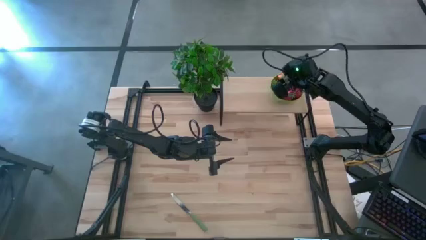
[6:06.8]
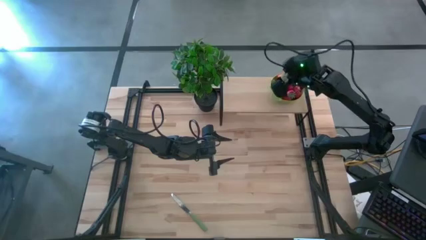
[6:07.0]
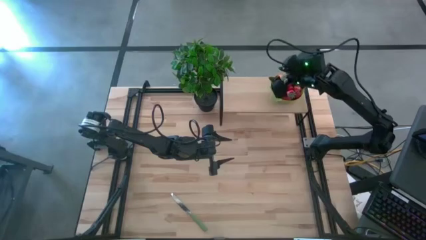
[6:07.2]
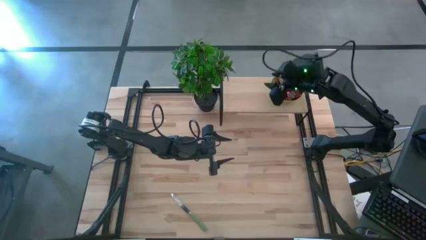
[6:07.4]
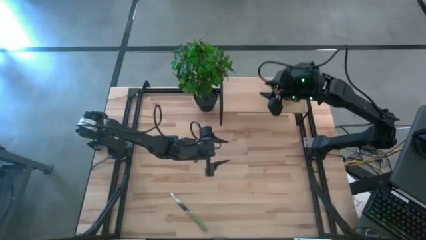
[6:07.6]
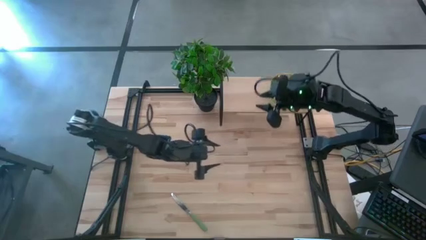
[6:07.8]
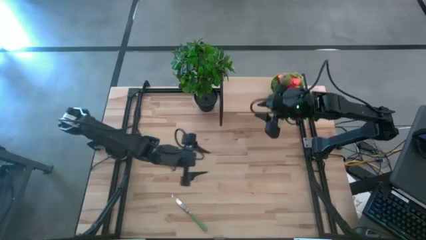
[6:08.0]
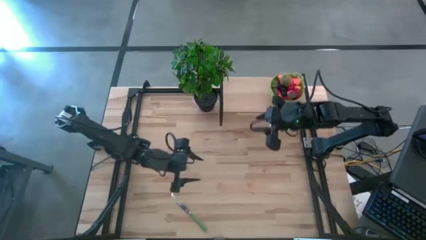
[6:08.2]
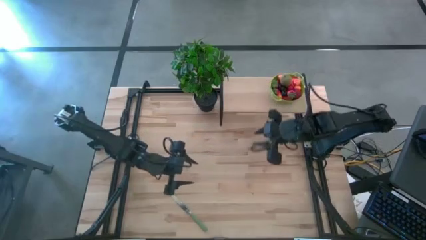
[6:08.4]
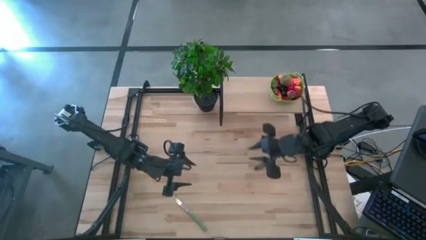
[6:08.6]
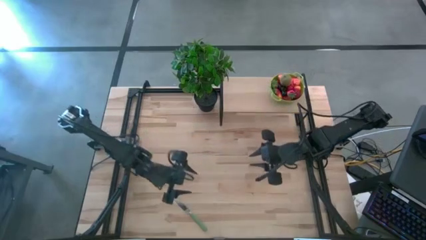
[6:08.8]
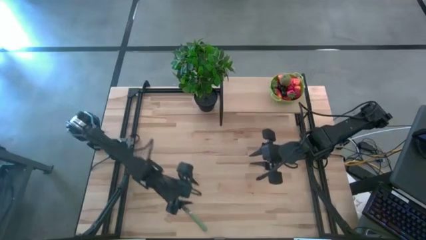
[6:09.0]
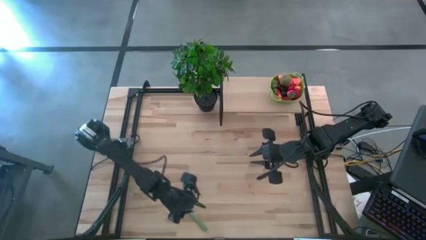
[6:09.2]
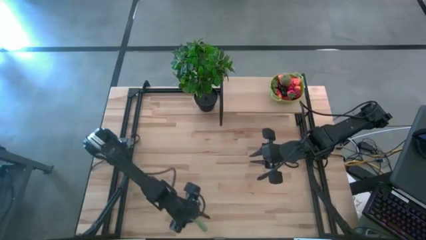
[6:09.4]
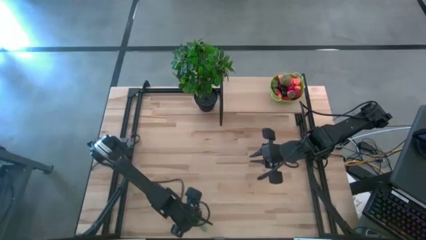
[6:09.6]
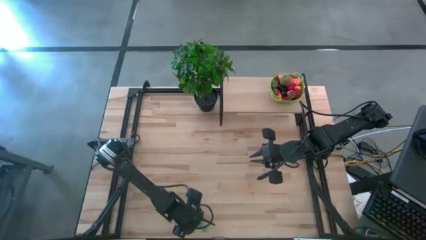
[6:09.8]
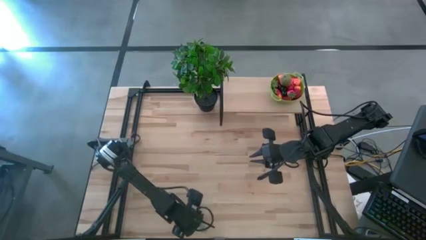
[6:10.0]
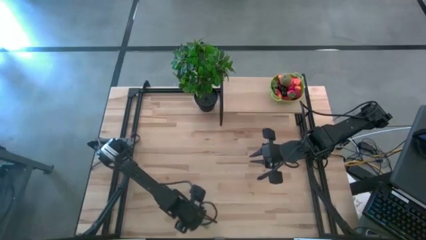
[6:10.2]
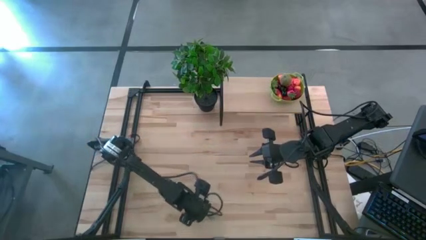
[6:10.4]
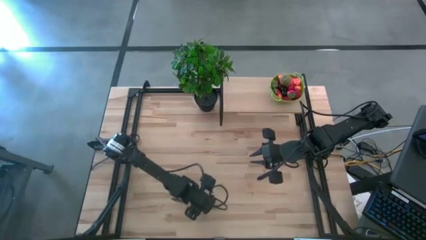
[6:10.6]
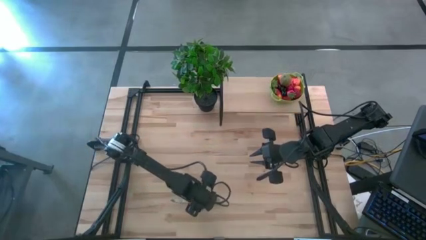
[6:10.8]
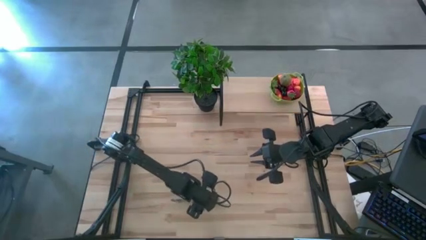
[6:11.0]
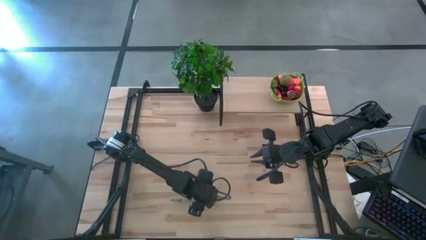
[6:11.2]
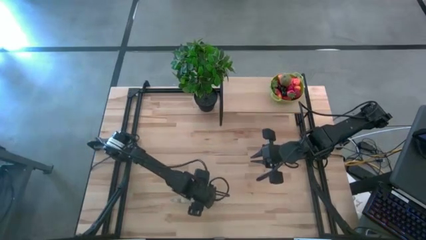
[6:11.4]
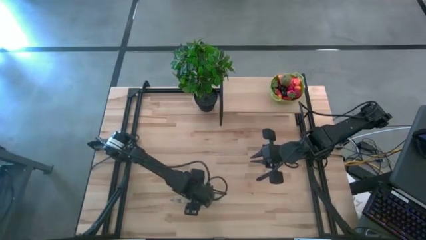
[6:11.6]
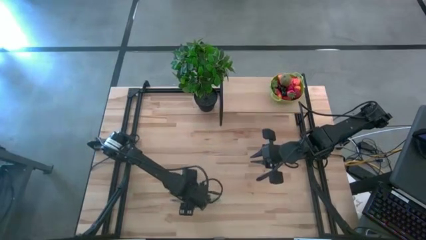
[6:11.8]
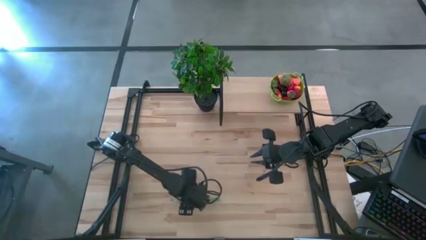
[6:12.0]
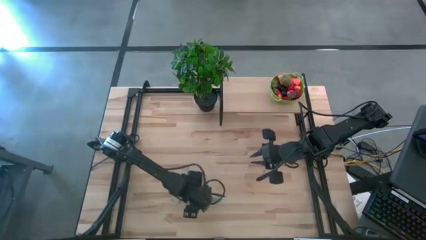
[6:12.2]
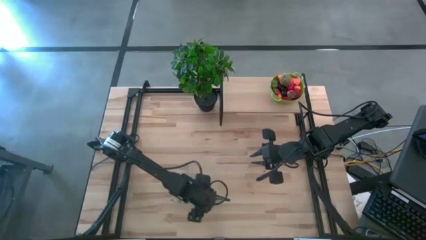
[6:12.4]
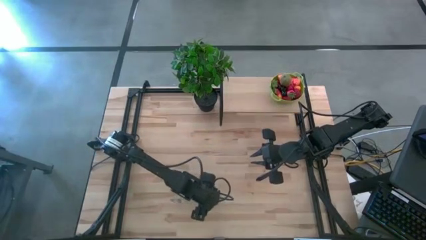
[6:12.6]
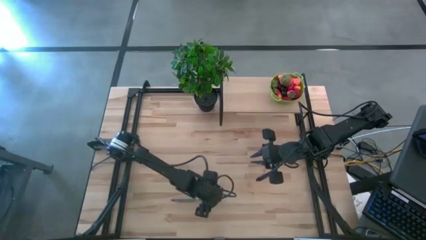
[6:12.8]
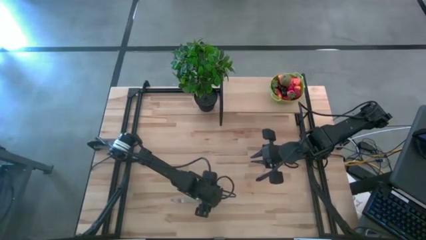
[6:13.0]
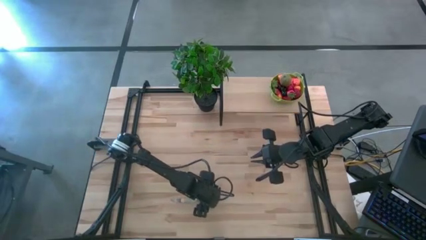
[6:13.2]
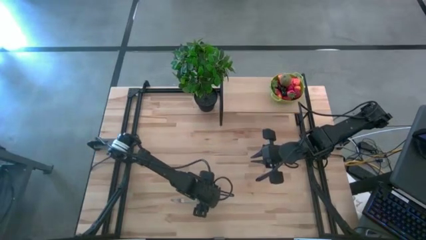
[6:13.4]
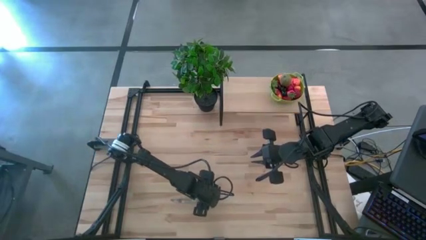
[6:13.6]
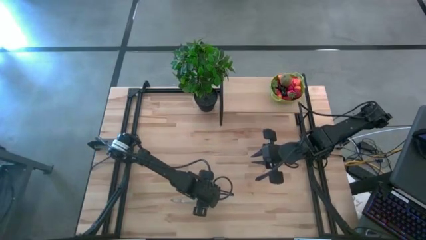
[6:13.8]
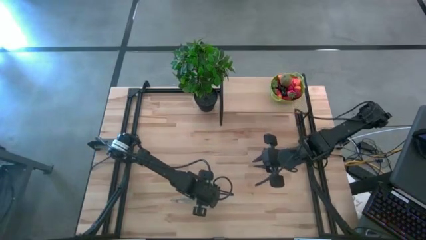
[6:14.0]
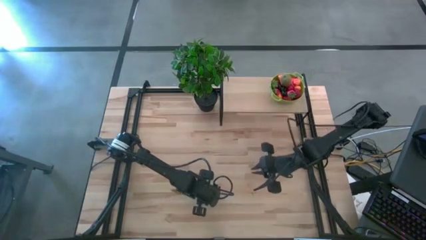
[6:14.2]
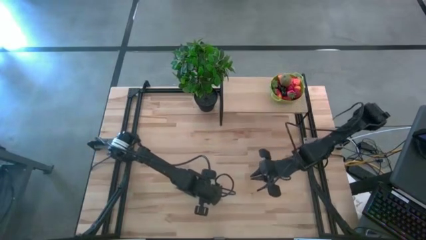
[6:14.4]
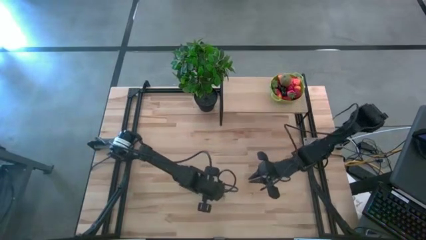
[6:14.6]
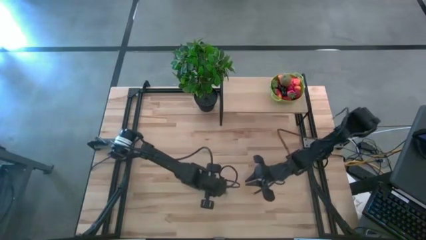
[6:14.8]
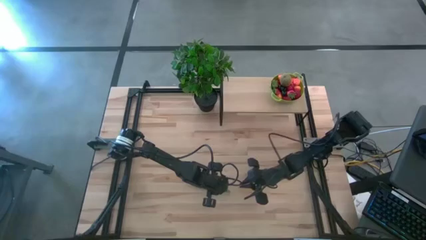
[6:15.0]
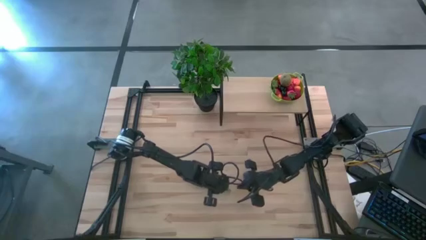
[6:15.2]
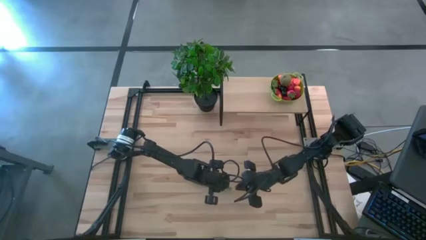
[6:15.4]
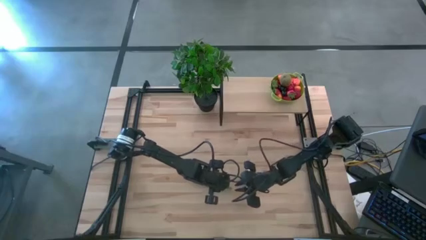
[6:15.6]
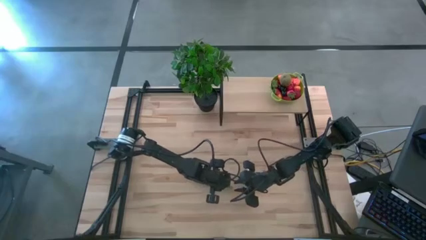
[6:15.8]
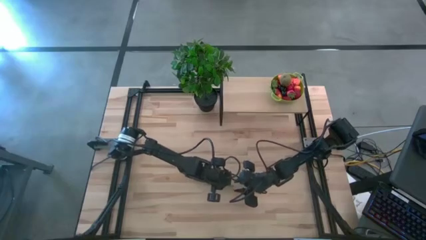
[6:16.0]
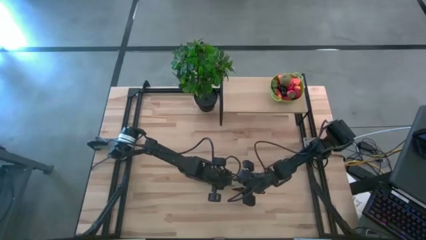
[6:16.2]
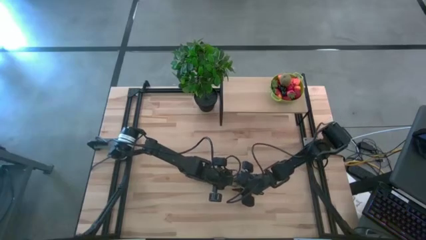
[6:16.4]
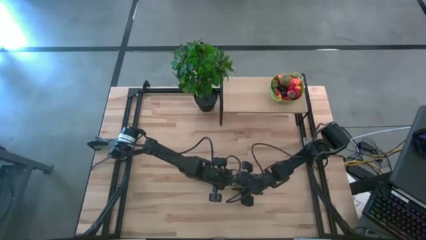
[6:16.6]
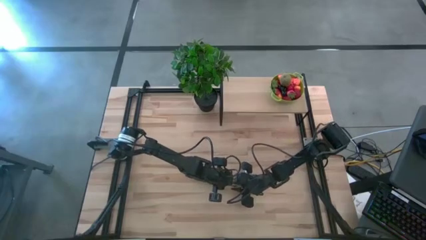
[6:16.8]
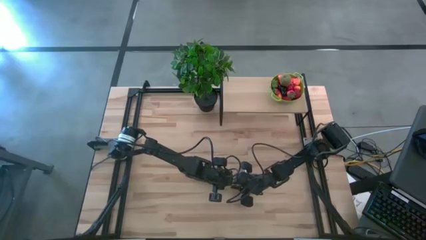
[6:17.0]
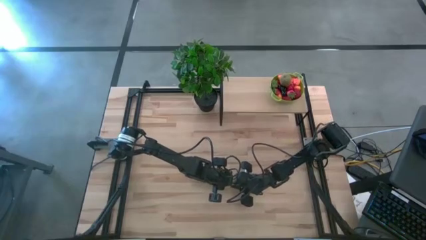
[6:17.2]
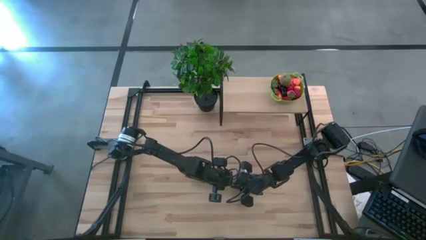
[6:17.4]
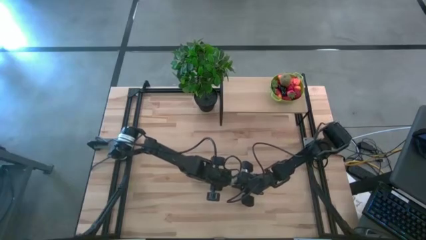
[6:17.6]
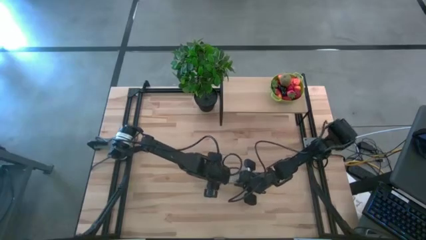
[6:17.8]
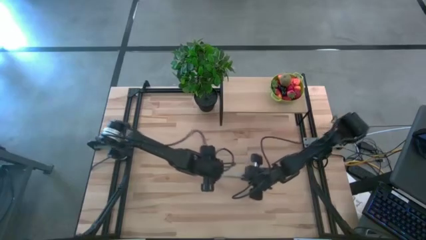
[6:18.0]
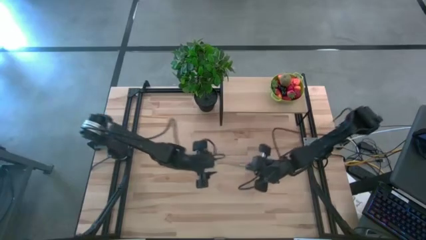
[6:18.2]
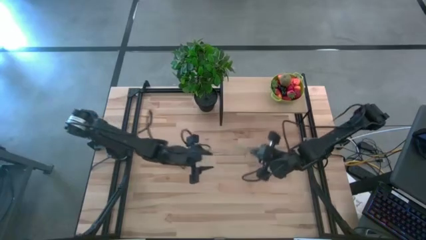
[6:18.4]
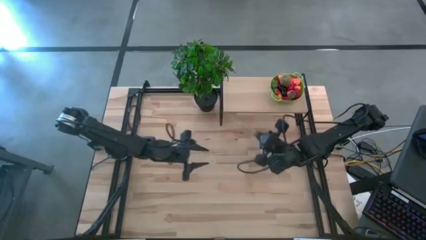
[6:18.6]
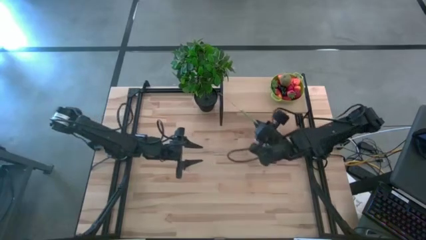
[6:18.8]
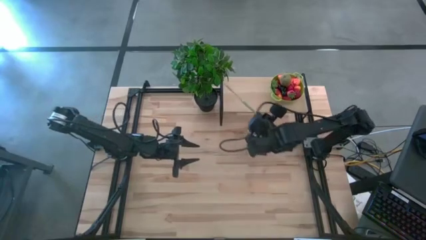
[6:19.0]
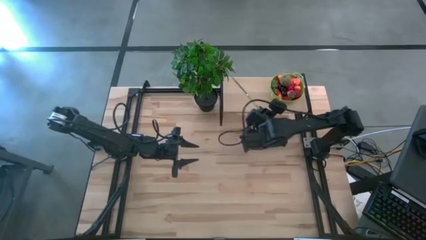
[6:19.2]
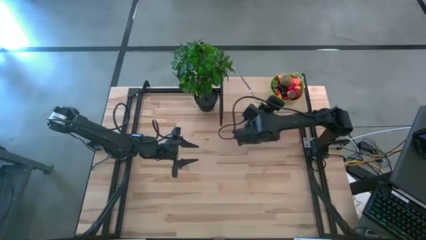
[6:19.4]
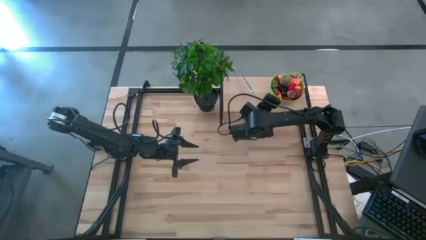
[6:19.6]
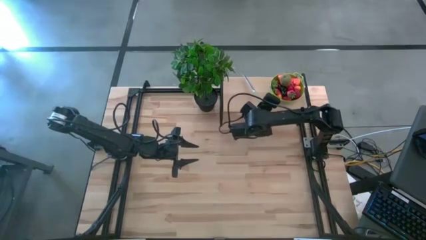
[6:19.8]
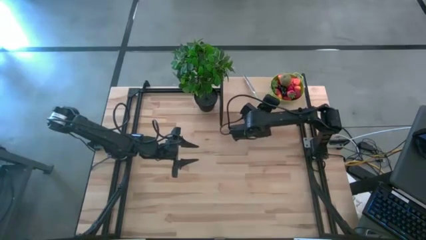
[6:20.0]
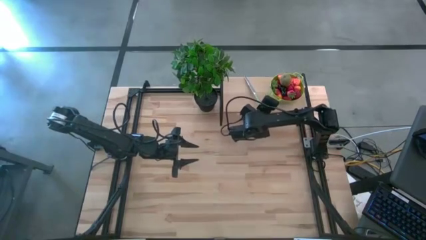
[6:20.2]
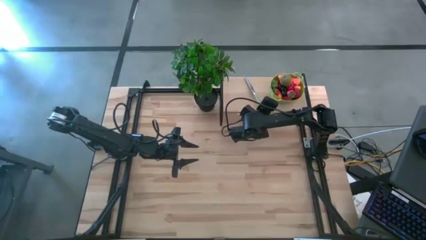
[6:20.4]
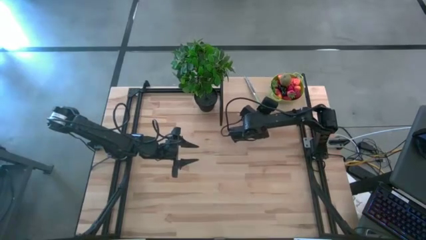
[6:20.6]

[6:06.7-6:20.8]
Task: Pick & Place Fruit
Put the kitchen knife on the shelf
